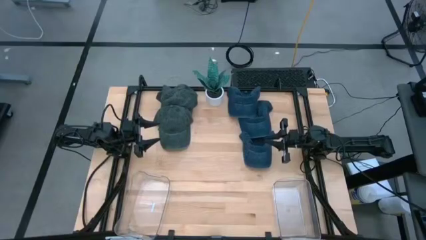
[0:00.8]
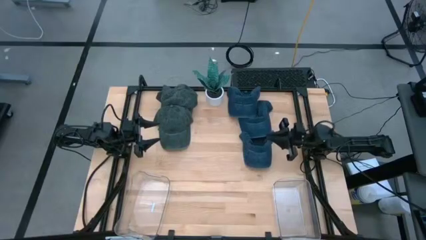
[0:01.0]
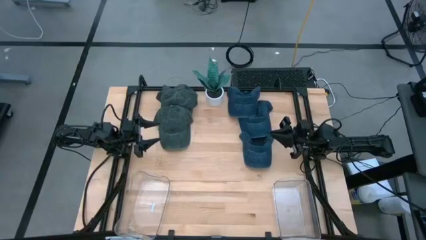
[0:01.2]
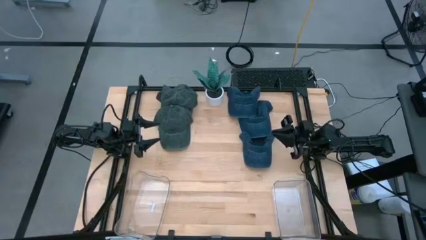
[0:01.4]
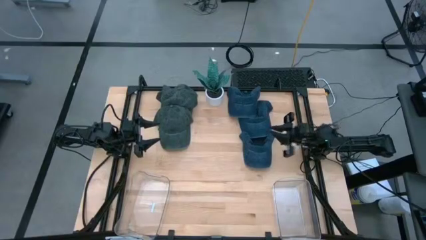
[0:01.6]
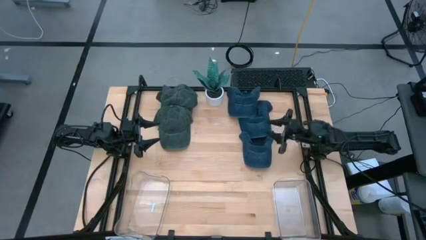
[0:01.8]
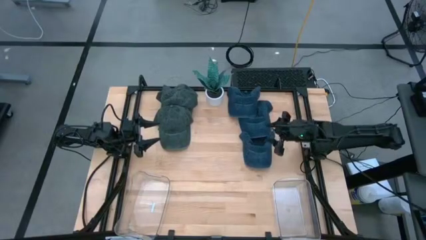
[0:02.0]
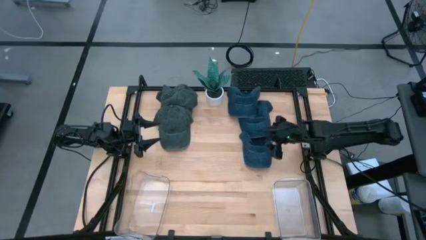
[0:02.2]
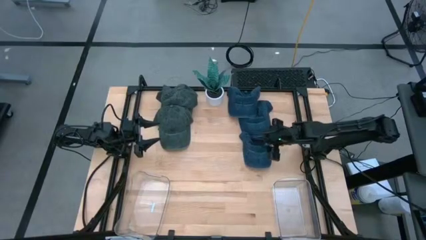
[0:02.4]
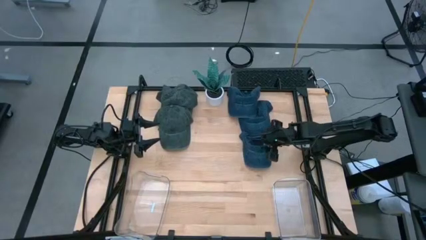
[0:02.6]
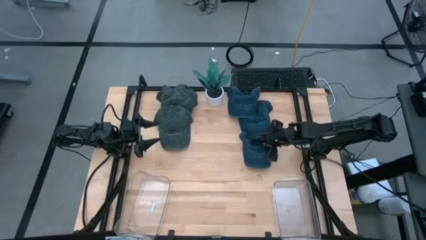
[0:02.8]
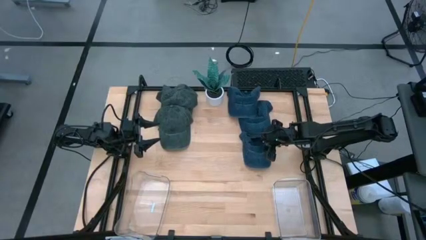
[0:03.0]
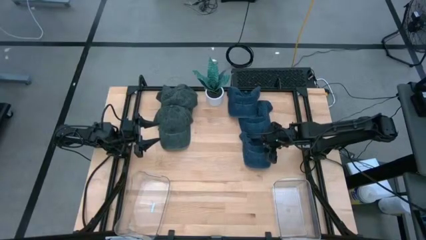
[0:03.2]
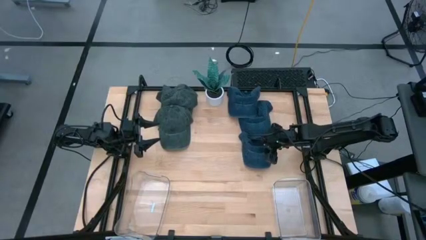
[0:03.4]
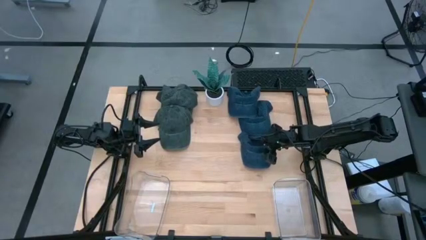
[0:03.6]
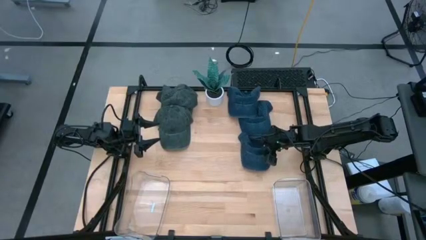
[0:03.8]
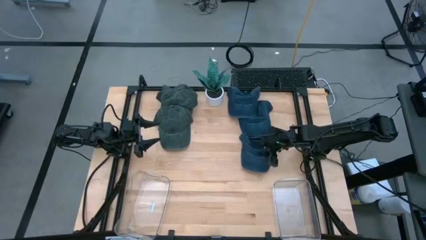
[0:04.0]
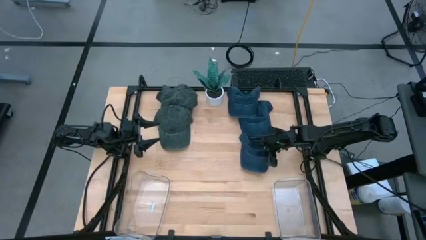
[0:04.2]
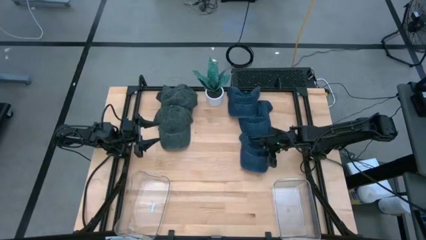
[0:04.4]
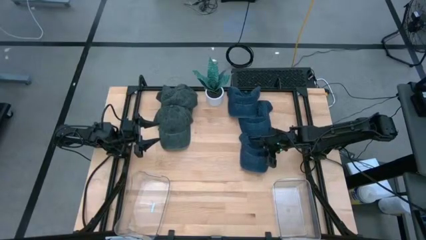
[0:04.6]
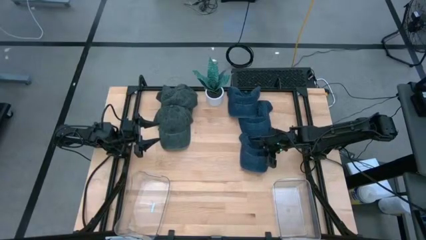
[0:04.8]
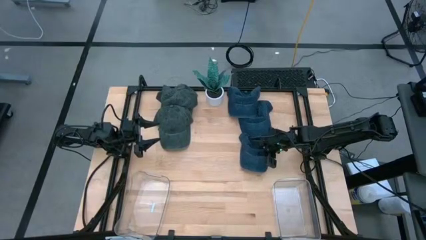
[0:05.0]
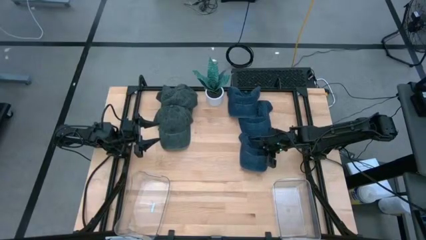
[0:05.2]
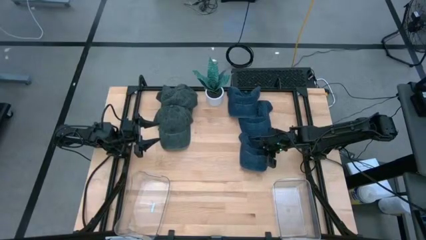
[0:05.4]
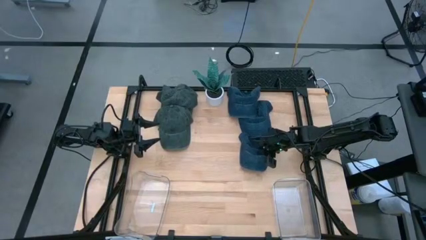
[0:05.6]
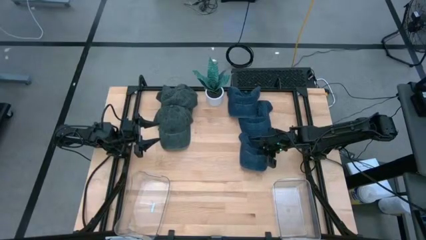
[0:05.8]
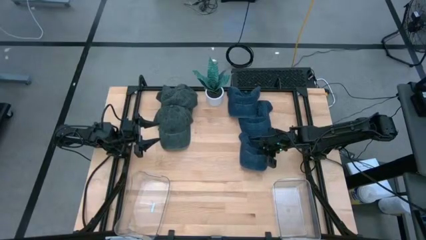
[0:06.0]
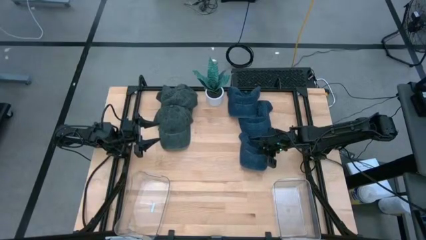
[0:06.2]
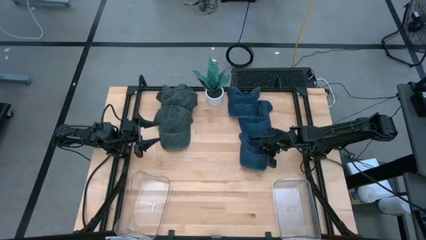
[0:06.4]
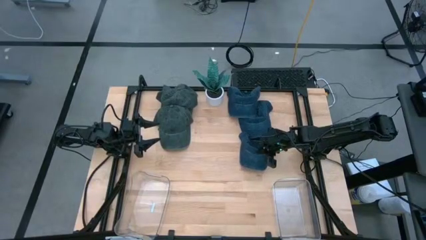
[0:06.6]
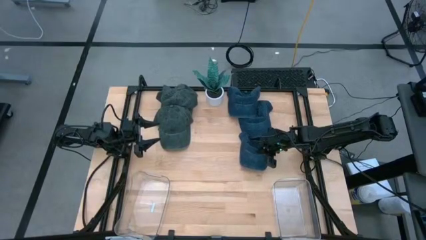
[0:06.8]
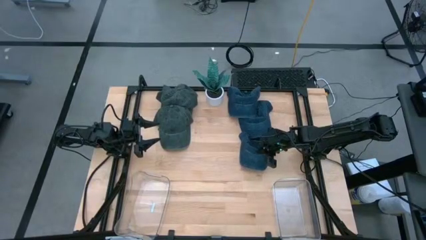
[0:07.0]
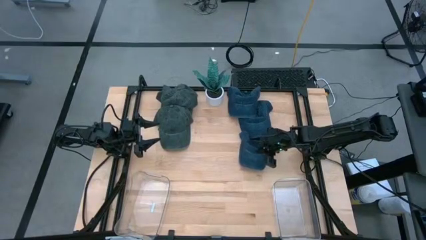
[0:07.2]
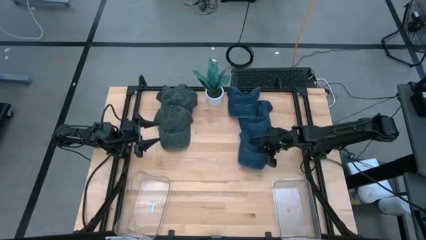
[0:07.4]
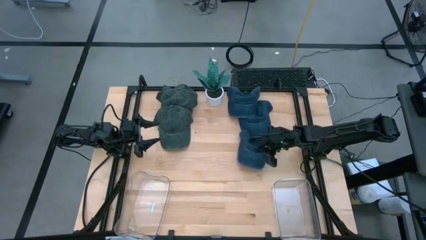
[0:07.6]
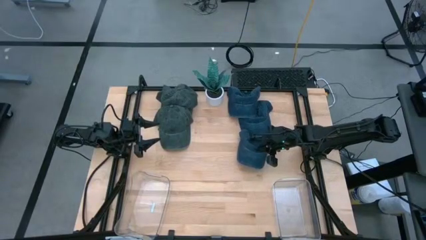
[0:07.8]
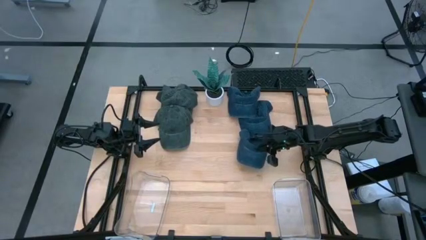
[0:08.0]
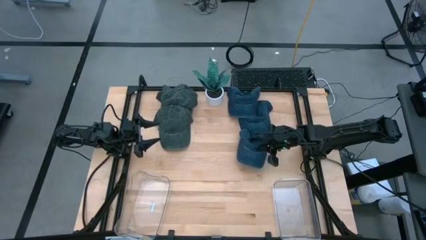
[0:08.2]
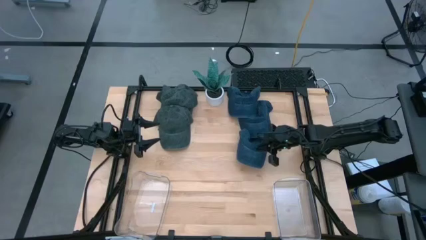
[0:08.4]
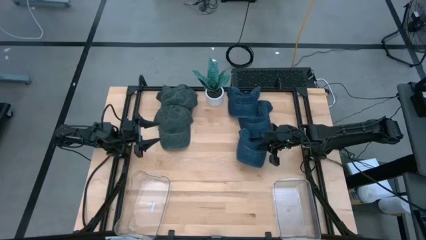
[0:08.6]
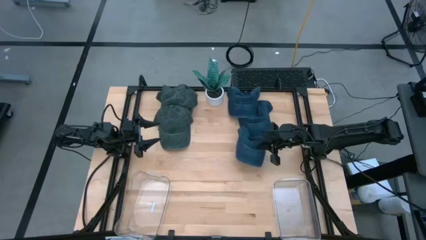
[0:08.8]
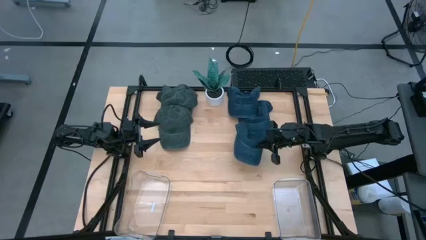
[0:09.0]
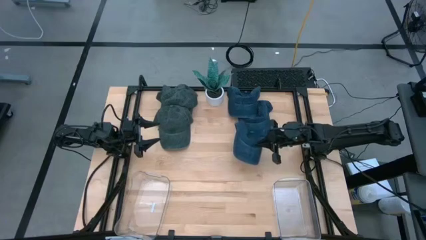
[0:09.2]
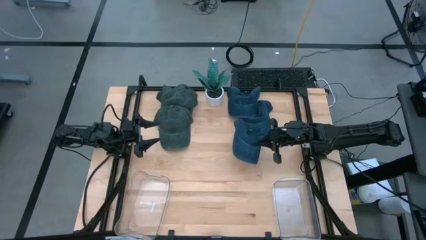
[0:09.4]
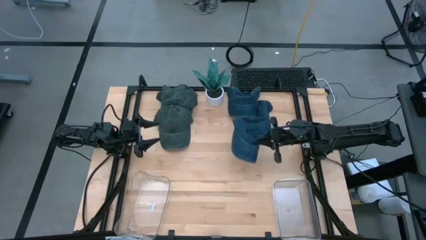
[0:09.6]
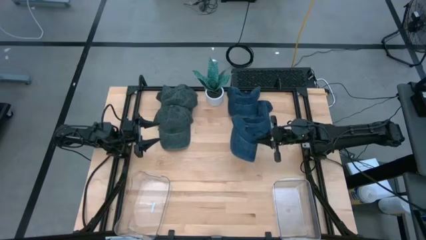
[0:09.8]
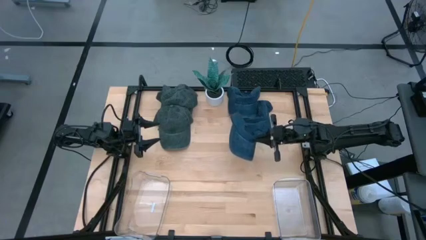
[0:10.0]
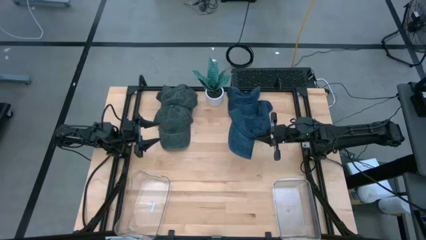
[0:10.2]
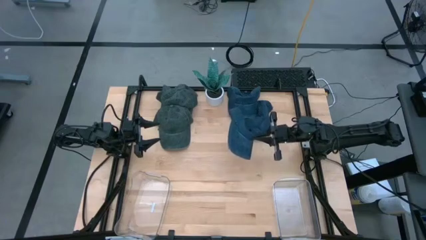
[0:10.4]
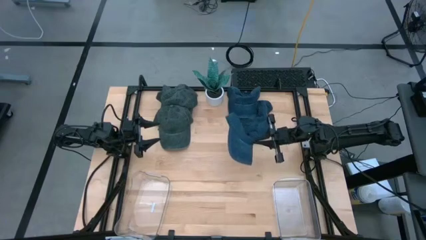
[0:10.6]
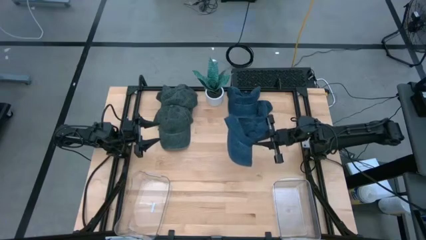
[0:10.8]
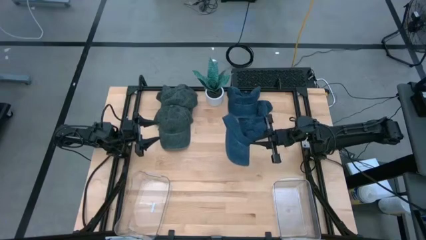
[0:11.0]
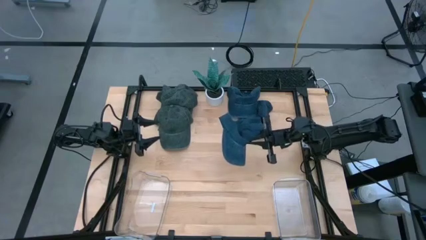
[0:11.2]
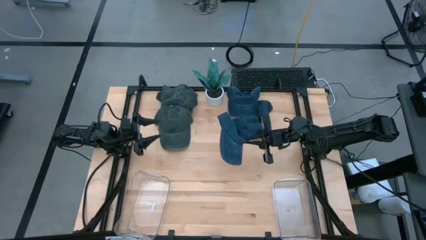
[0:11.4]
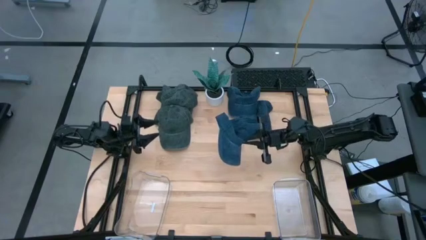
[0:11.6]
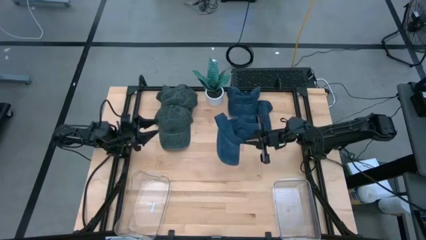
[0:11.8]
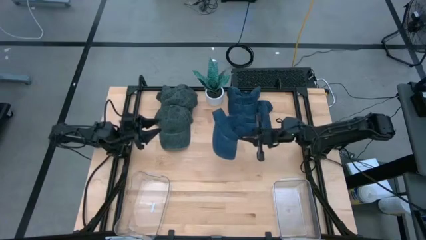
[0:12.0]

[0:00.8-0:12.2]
Task: Pick & Place hat
Put the bottom blue cap into the left transparent bin
